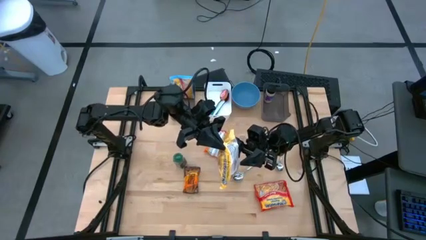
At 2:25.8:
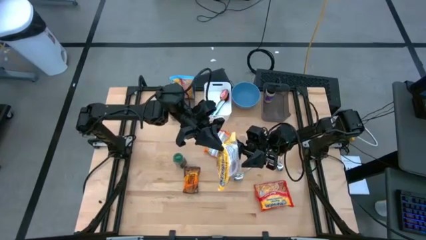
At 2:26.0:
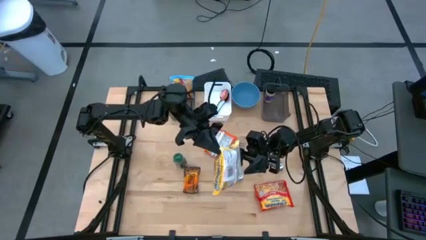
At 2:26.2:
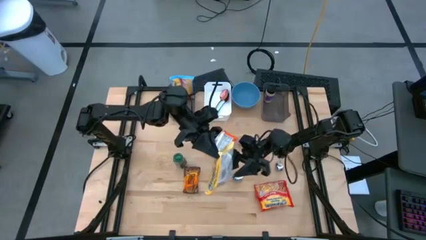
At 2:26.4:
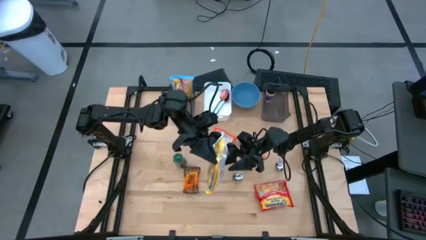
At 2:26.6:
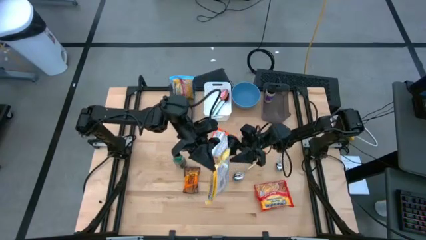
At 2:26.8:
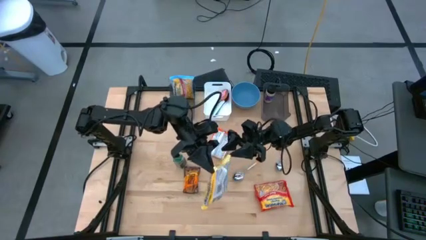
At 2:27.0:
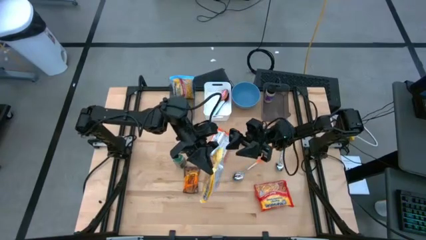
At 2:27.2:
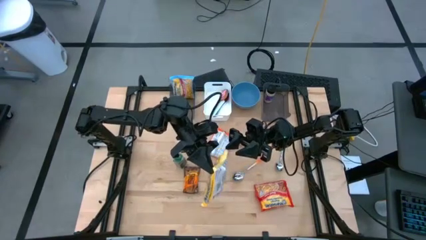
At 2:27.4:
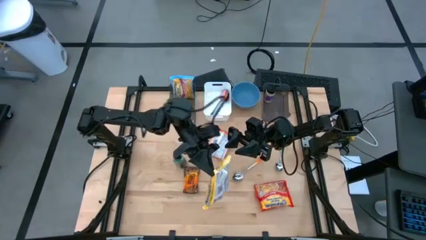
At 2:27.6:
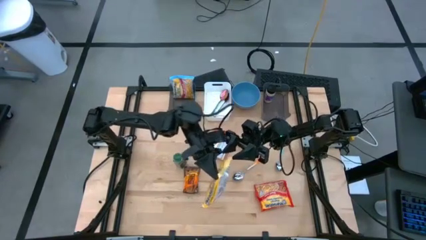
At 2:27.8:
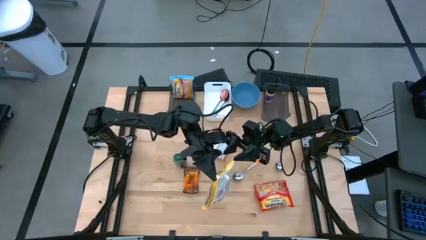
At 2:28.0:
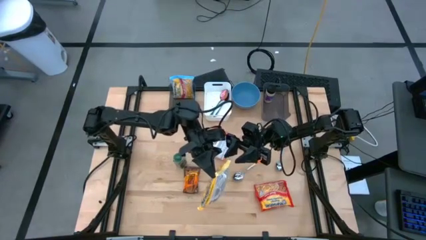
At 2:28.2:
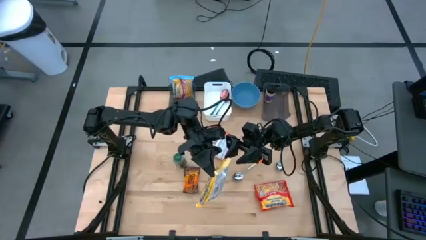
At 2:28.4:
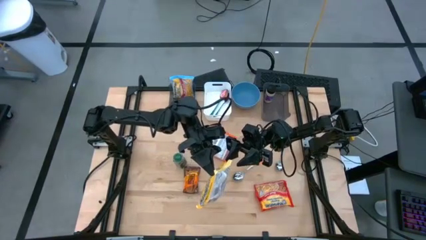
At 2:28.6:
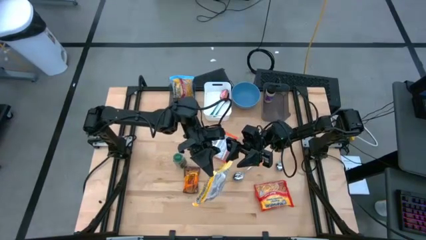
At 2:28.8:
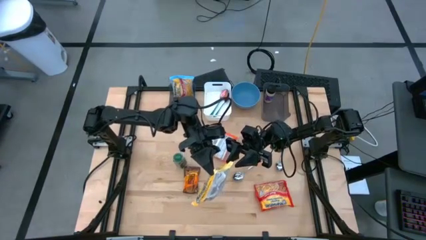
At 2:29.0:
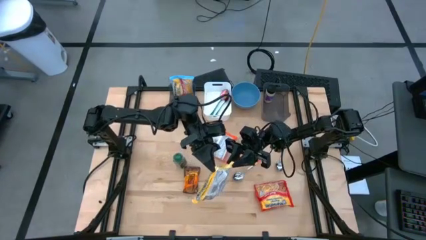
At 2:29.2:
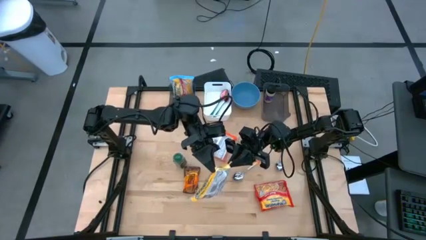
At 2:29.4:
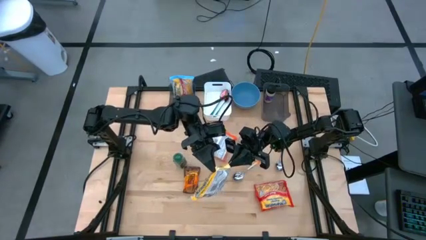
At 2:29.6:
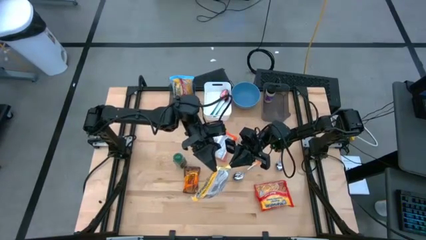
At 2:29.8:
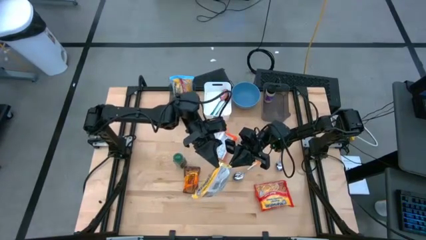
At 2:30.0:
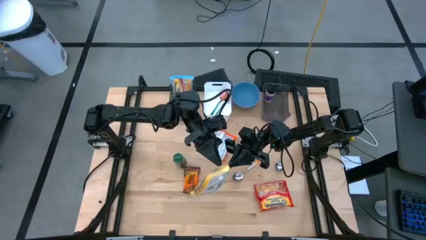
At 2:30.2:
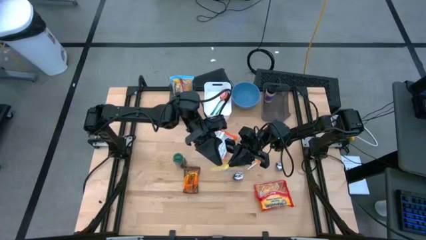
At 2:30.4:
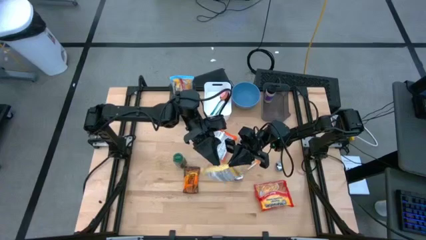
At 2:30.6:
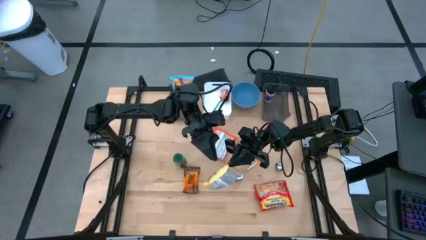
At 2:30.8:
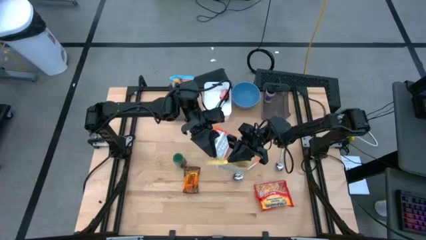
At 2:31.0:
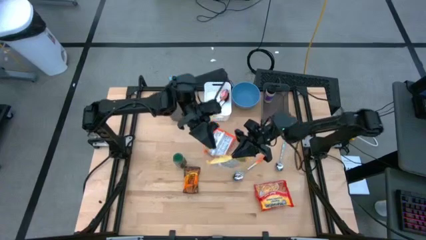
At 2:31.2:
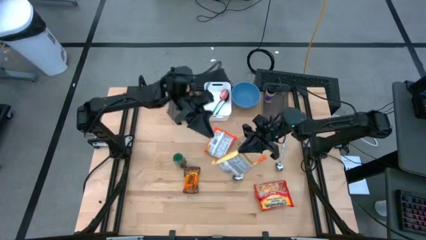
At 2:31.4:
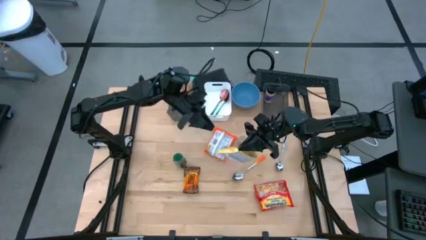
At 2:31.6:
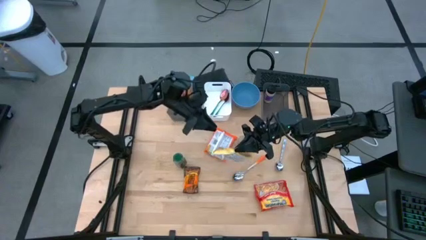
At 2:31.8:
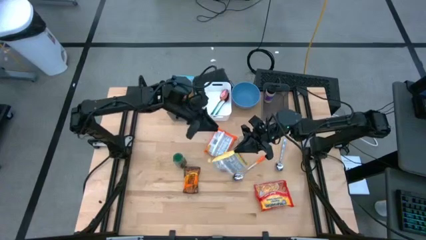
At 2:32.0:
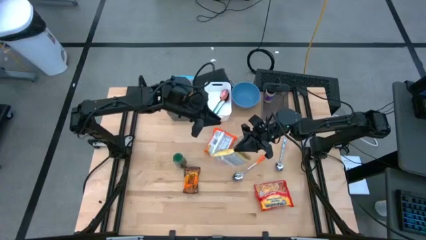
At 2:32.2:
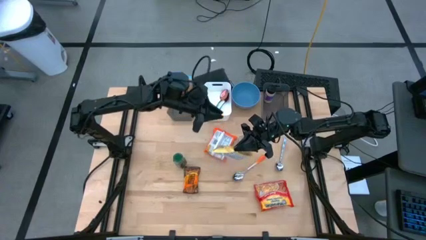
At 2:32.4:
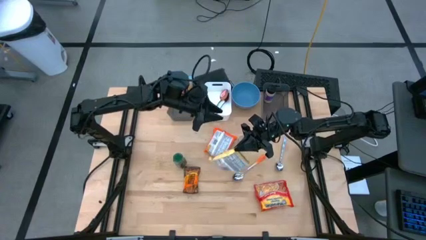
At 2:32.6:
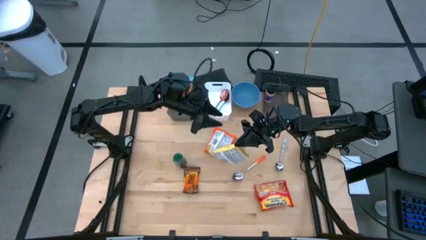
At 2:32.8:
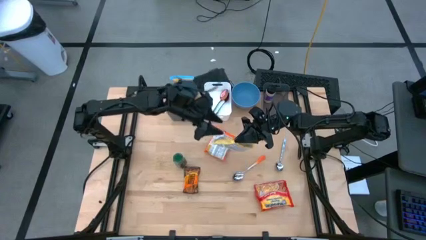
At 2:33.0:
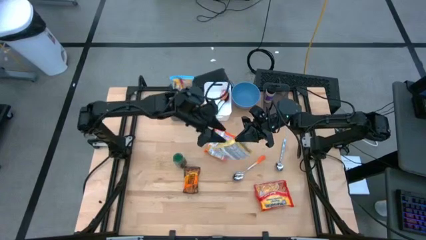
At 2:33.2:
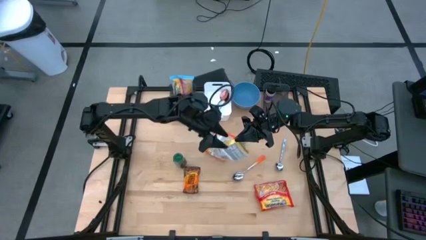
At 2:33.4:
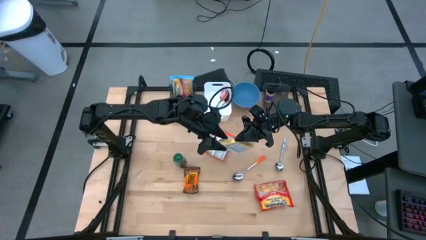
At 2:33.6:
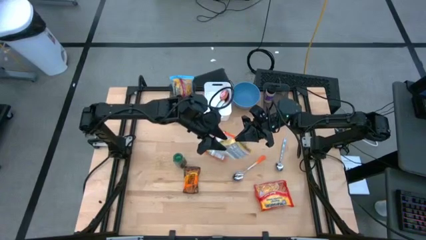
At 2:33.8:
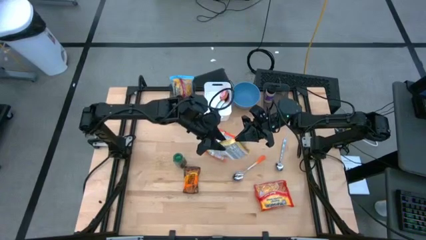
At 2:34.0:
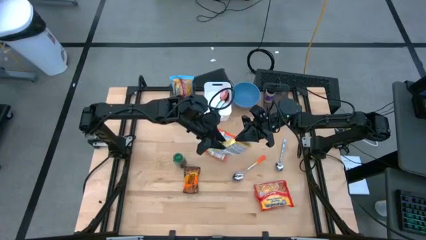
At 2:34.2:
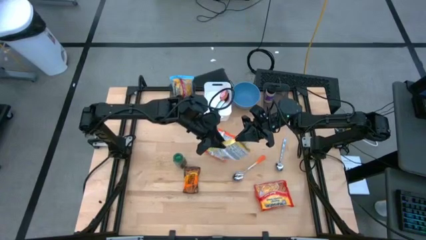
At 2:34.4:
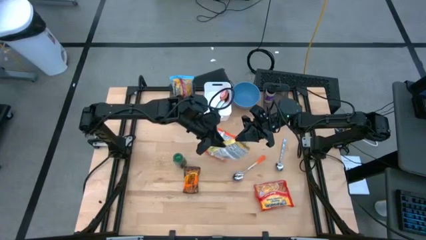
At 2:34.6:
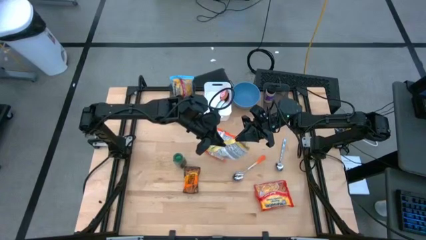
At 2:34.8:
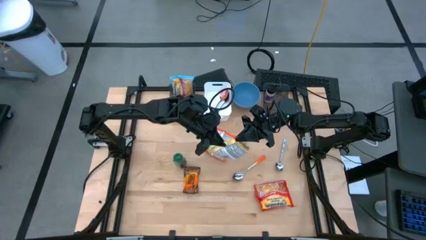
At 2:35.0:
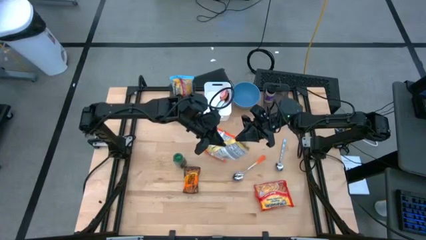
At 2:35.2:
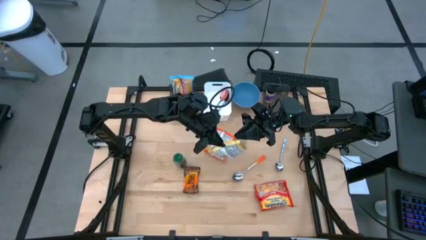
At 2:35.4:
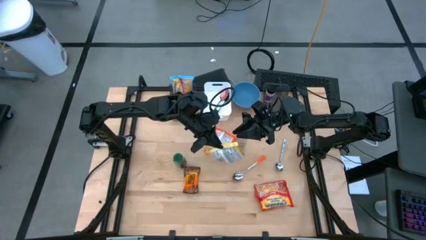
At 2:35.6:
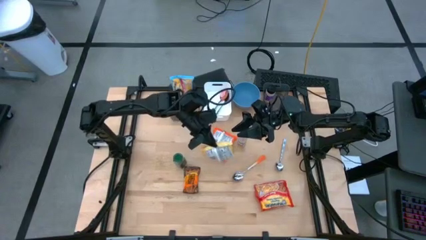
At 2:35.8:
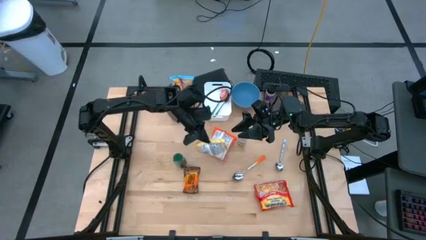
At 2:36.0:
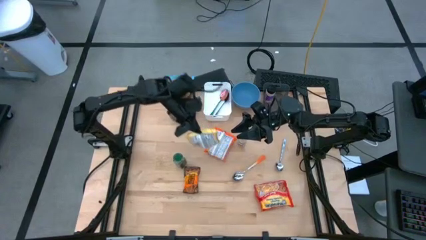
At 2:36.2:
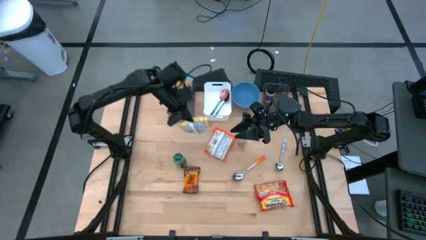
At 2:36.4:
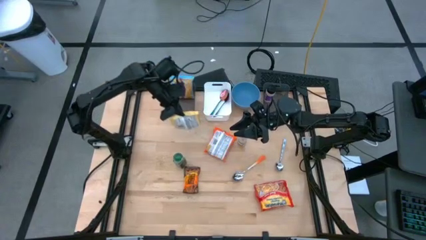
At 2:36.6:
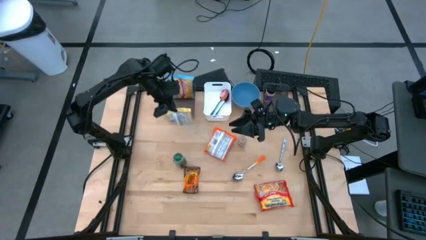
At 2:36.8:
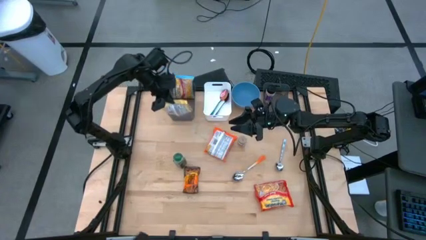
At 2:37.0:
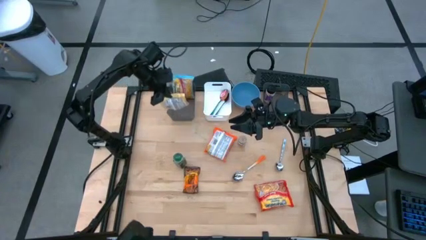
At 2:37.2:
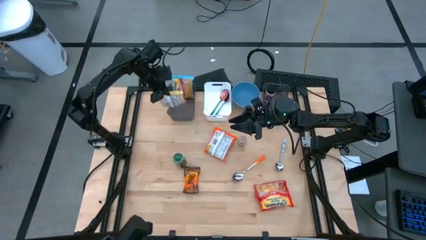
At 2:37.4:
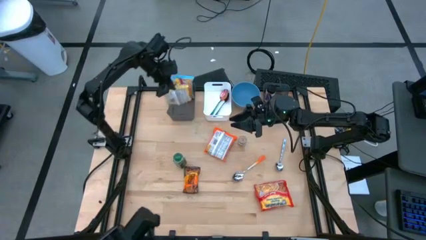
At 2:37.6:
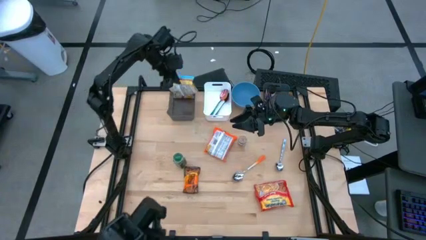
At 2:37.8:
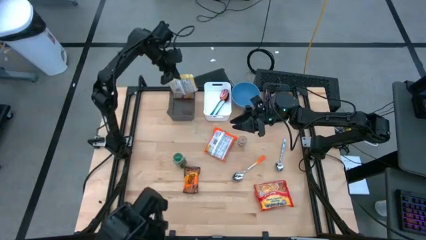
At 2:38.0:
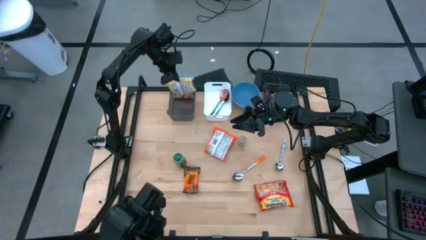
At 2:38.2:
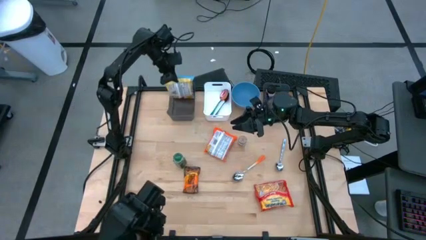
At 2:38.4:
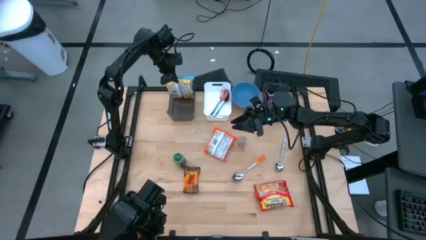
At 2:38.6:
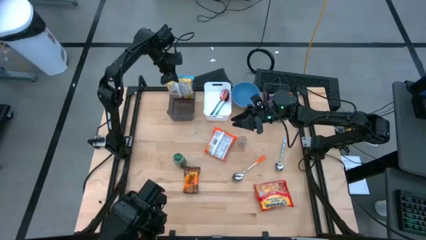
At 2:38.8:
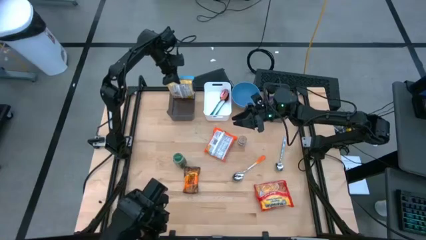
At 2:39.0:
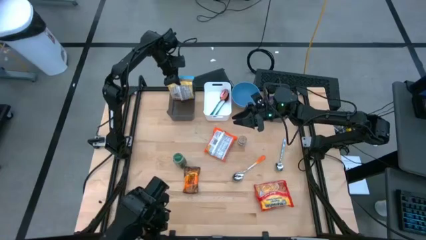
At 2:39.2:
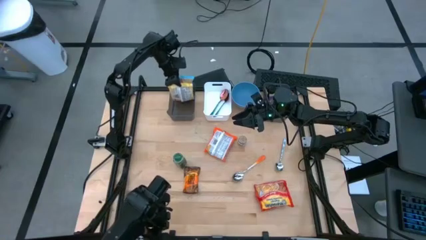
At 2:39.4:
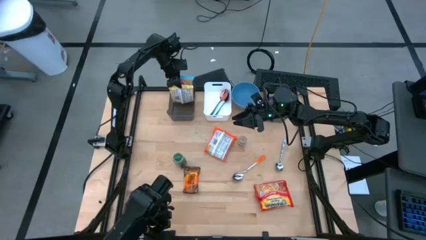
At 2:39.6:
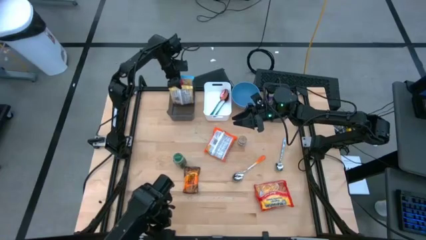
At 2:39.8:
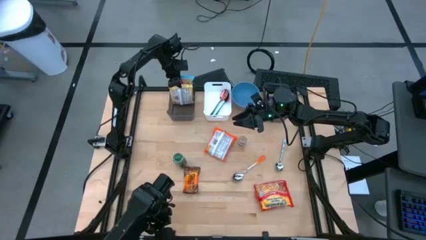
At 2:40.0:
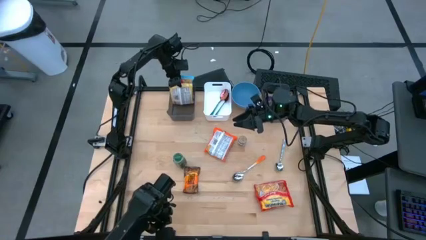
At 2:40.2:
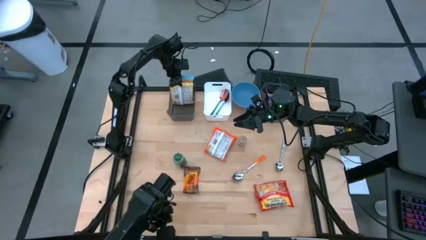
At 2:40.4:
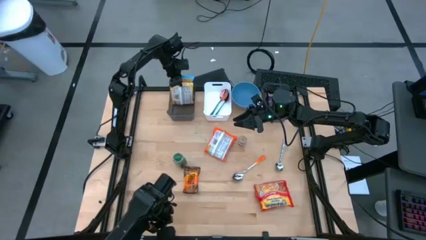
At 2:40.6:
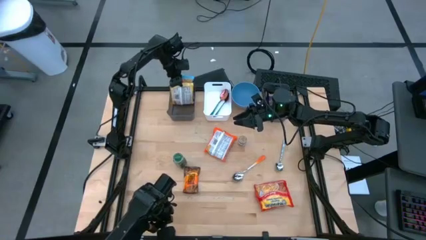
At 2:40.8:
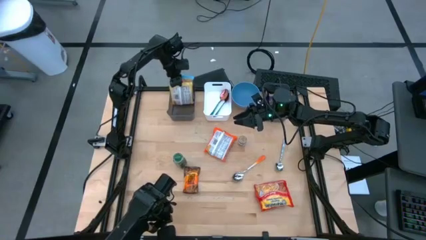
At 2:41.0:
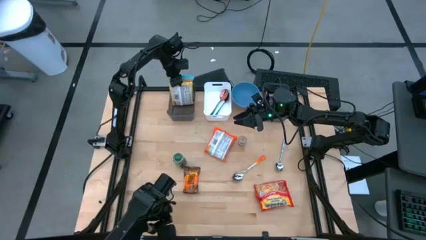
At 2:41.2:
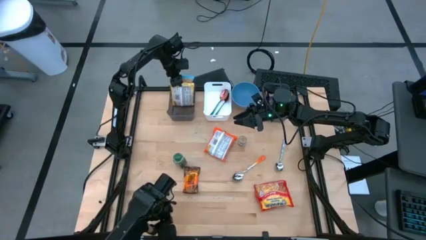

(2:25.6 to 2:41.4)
Task: Pick & Place Food Item
Put the yellow noodle pack into the left black bin

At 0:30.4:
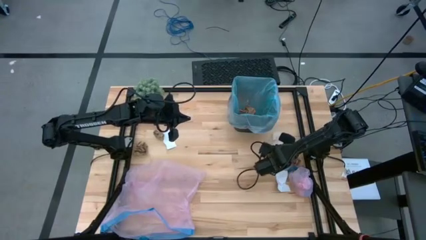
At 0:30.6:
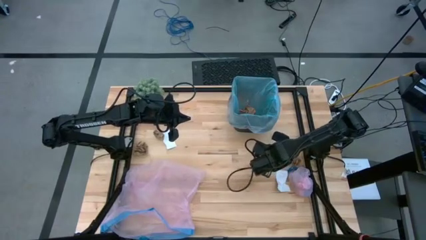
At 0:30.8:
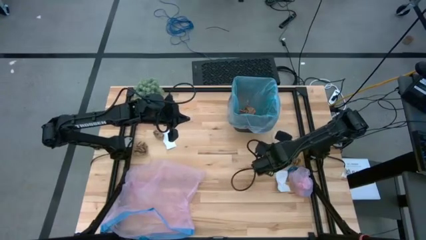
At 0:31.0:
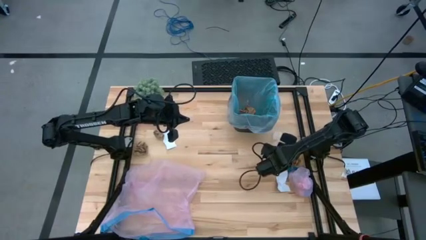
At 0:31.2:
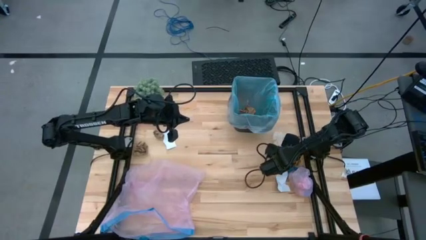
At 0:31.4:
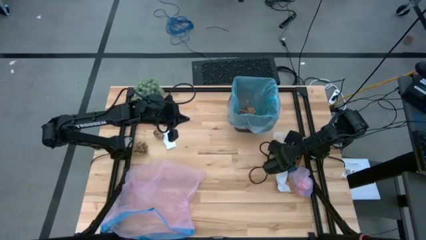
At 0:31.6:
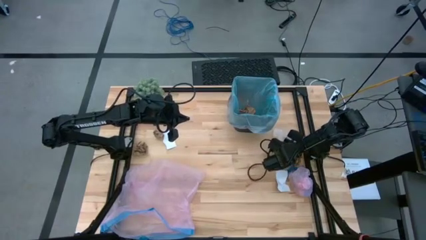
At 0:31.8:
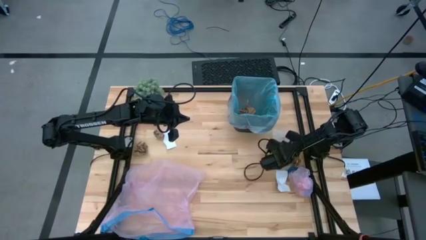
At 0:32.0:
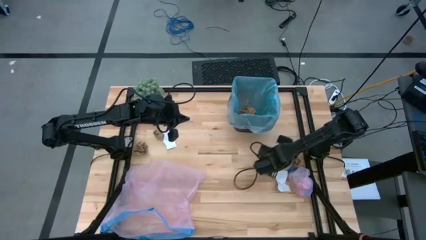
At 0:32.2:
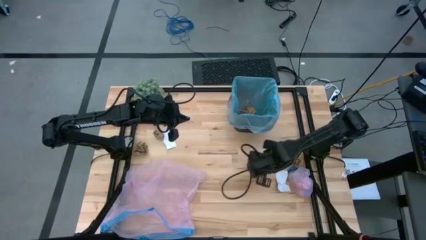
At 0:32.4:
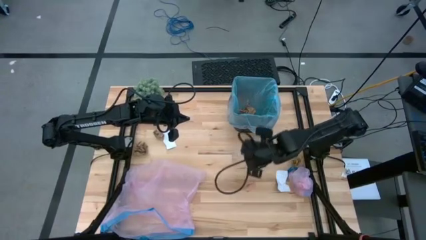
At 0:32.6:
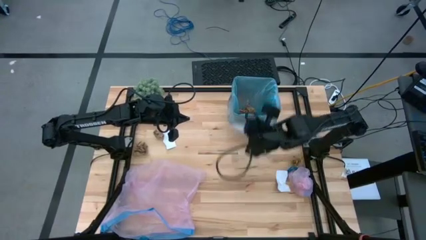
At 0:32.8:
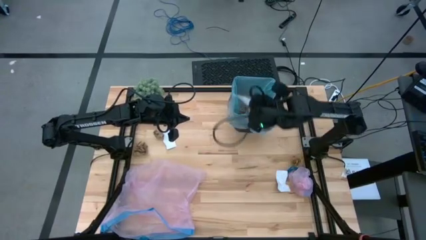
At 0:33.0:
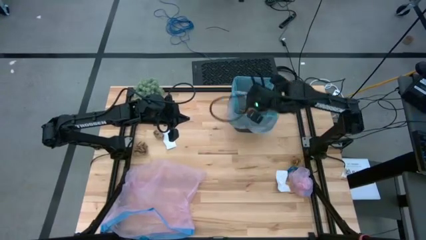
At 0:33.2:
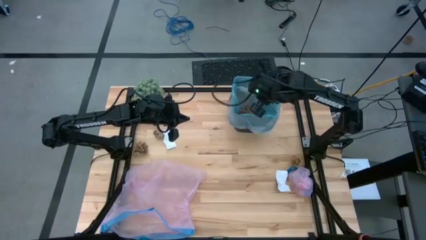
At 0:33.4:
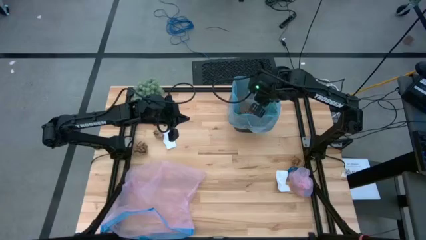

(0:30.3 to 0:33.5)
Task: place trash/remove bag and relplace
Put the transparent plastic into the trash bin
